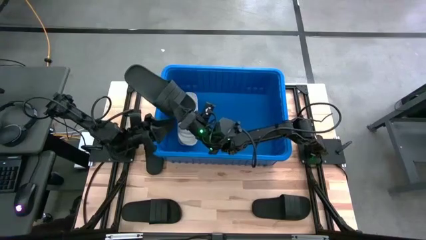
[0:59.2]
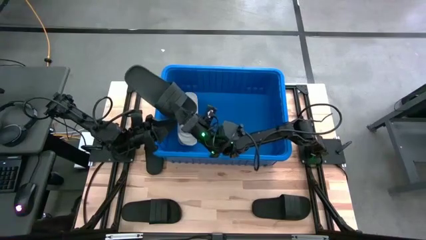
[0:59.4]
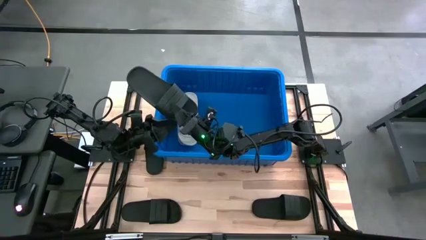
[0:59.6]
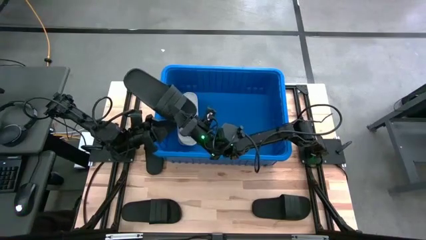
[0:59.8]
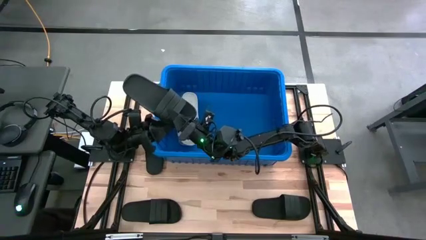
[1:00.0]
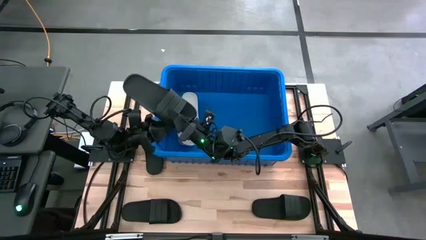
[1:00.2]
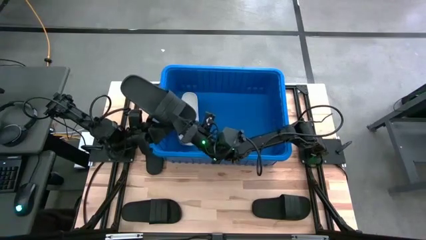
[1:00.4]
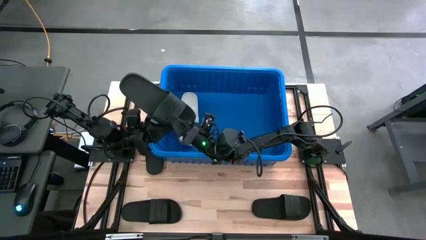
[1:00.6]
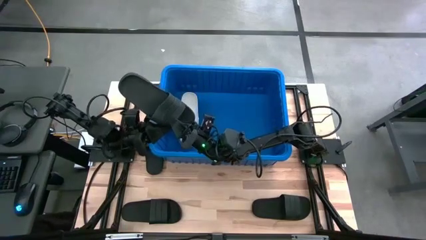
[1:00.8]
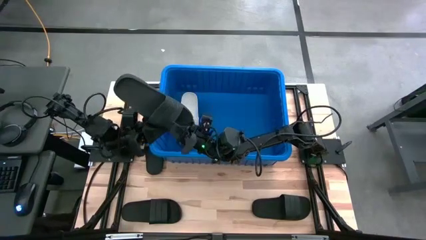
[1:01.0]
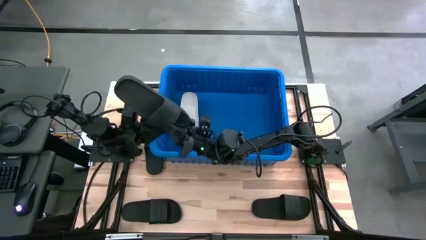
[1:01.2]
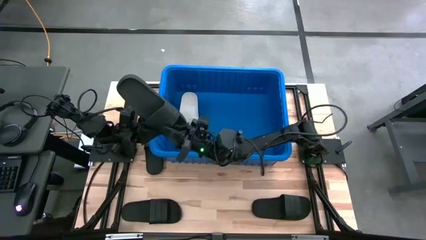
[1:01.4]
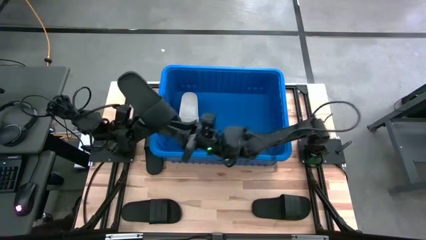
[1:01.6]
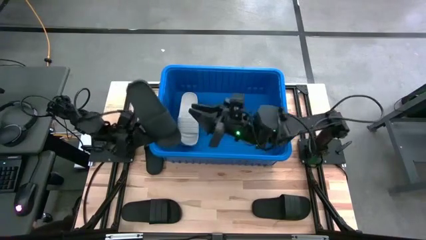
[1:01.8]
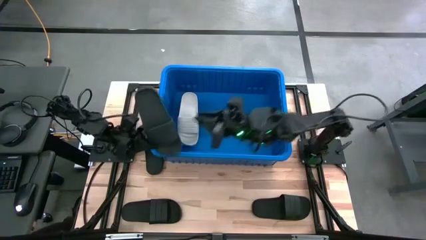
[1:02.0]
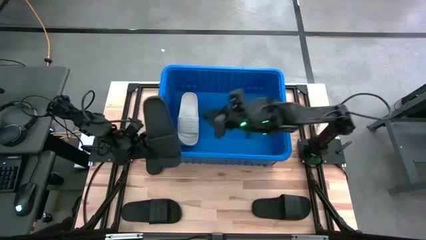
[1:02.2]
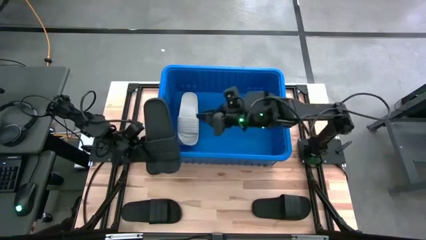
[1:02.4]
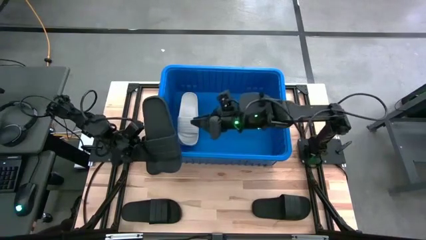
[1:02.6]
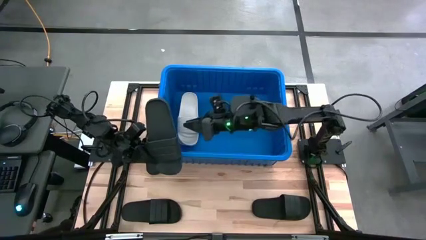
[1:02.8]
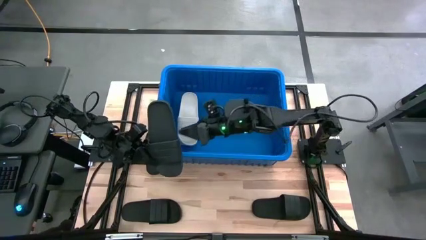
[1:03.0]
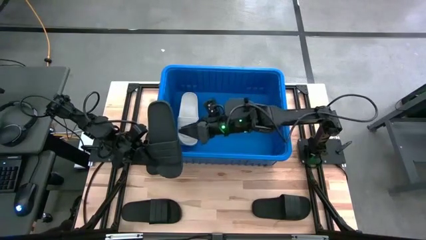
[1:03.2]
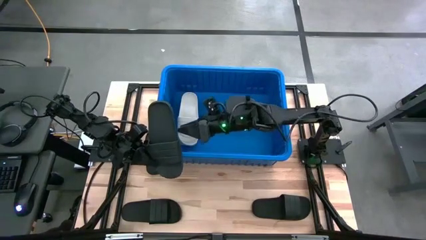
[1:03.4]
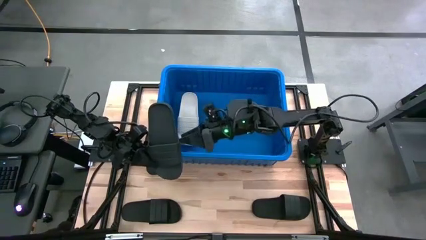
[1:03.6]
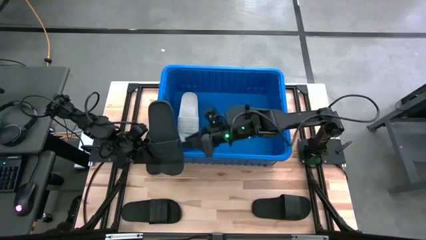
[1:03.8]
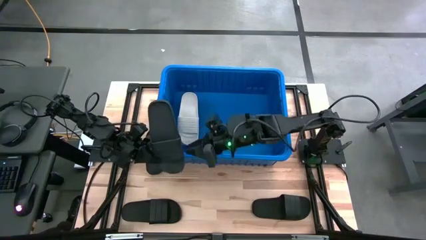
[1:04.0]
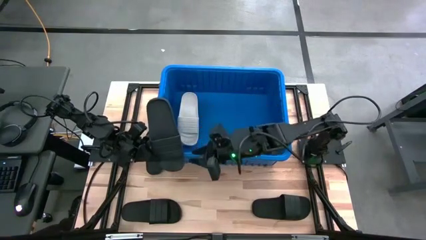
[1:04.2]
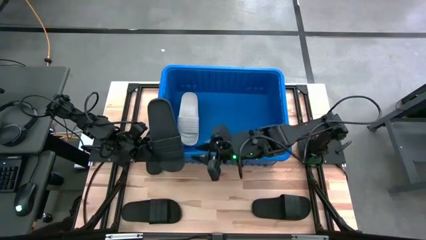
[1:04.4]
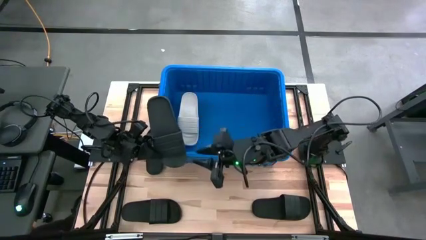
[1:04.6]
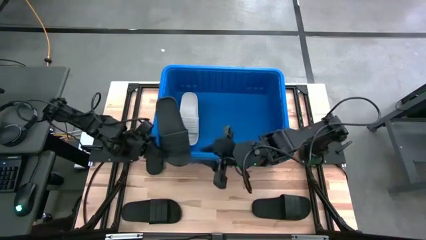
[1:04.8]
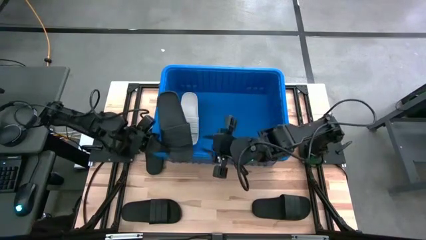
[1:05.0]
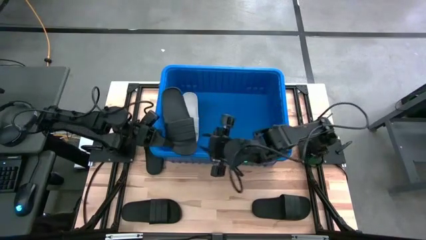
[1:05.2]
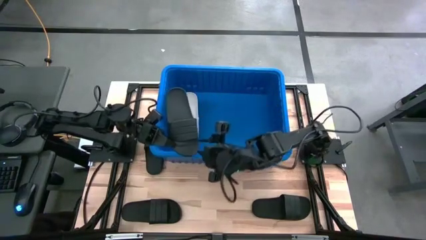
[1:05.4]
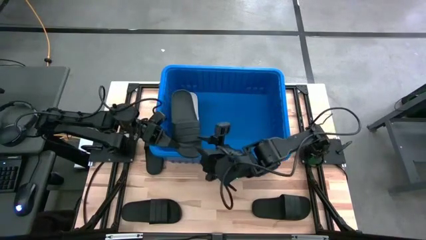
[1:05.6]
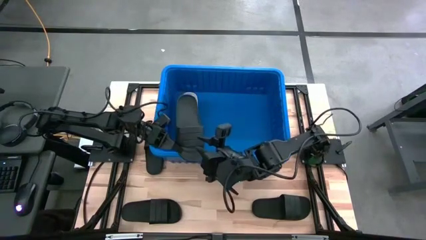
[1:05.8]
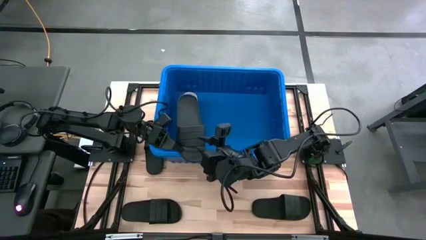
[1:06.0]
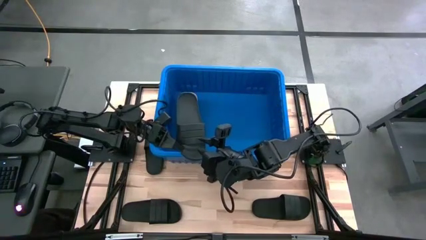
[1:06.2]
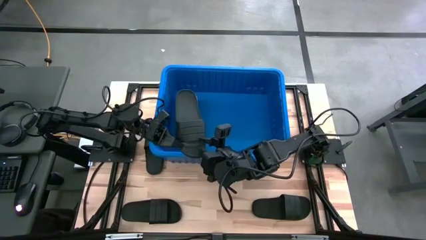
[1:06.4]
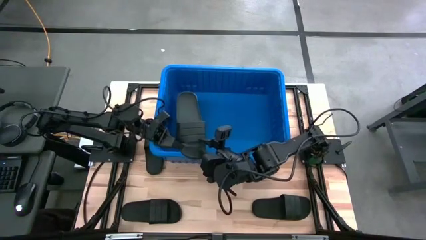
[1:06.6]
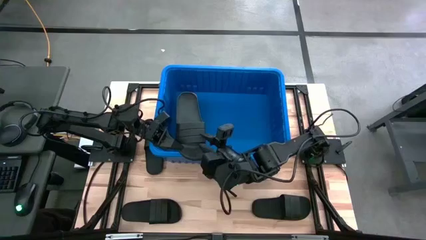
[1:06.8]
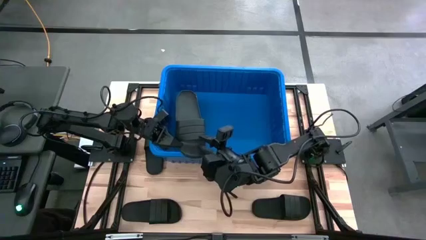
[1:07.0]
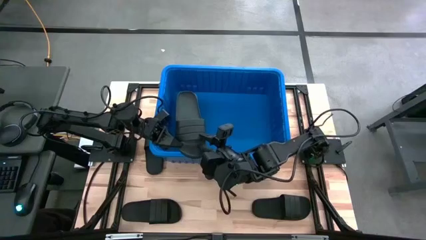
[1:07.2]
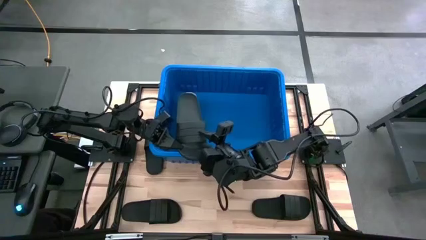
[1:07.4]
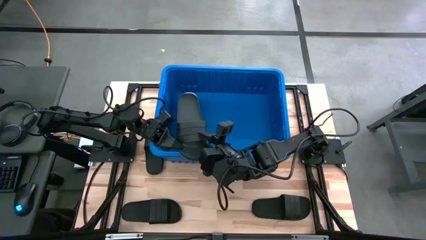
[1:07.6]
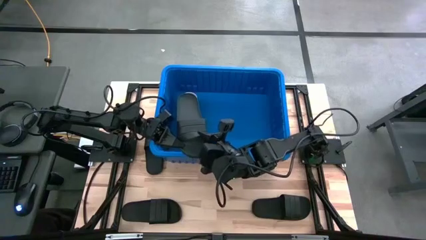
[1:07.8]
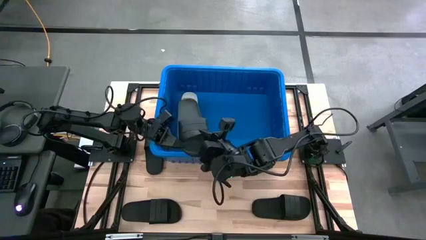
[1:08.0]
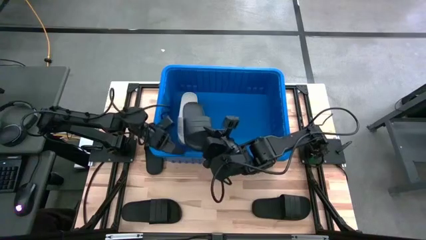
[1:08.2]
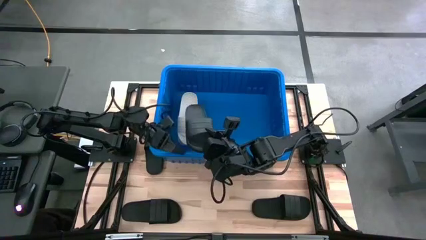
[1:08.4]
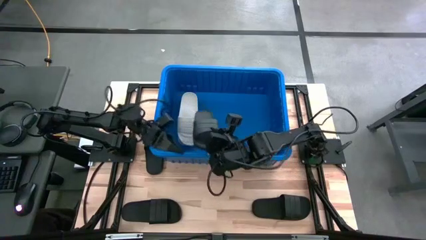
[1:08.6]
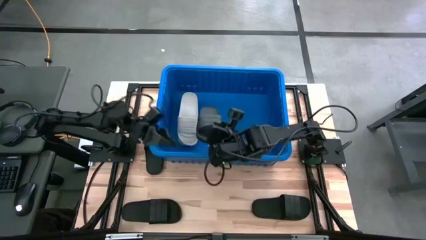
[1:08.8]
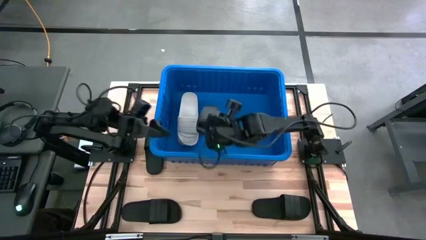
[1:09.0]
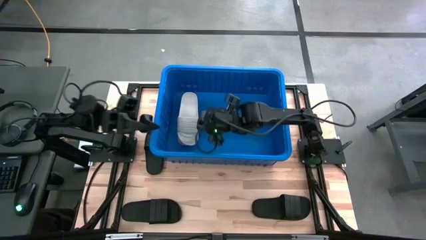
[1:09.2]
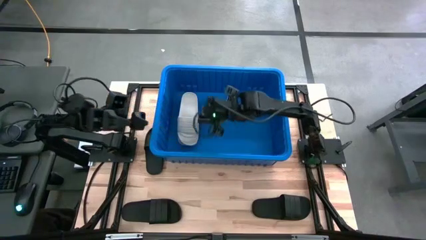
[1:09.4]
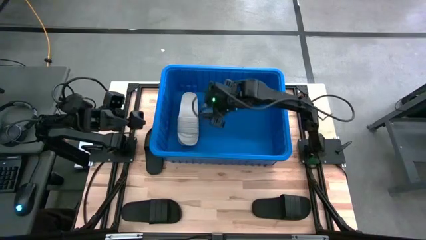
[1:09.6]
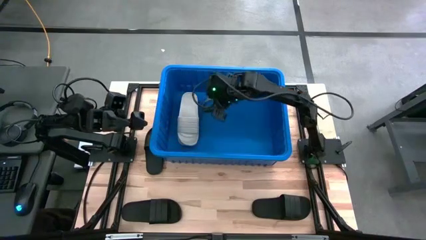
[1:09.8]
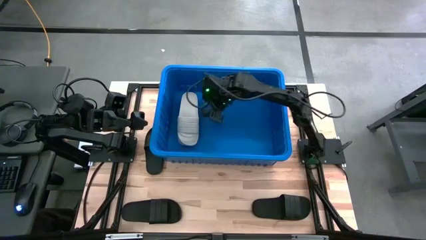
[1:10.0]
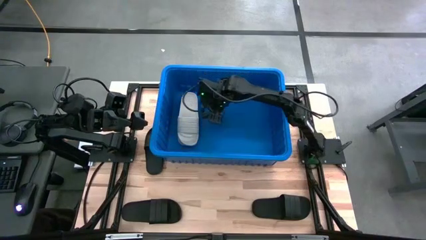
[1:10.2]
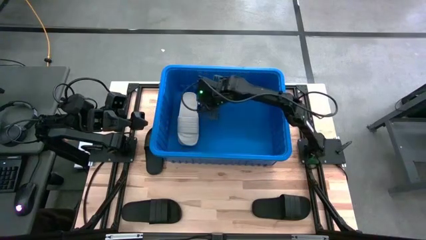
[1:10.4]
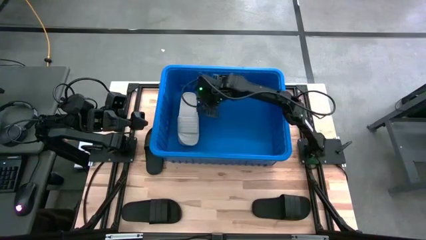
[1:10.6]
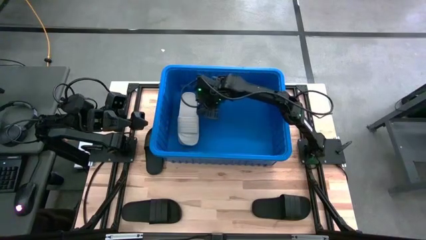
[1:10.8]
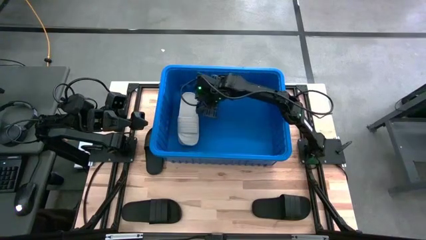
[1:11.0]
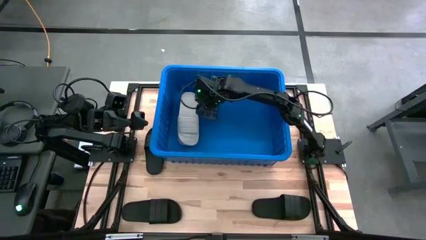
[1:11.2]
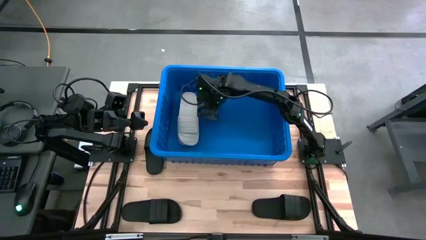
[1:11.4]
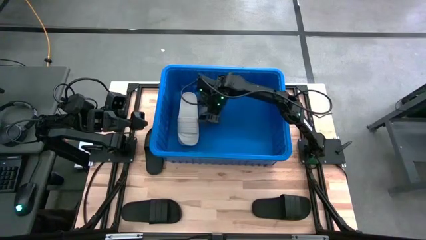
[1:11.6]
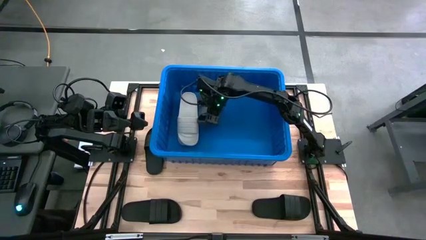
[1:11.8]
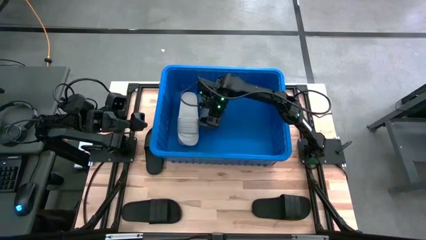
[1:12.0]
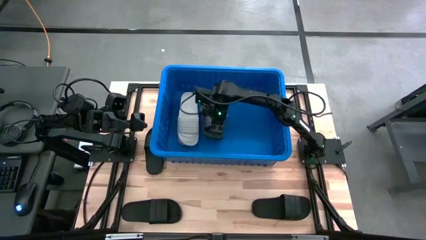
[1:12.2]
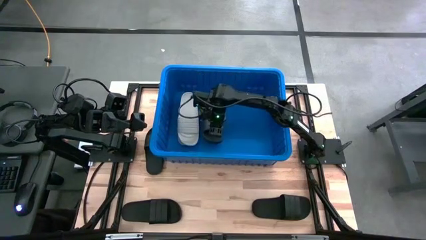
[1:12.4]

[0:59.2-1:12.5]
Task: Pick and place slides into bin
Put the black slide into the blue bin

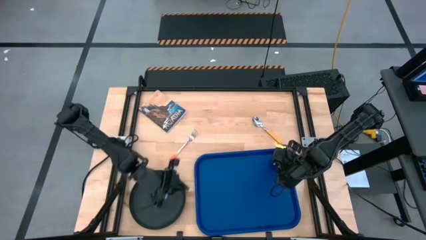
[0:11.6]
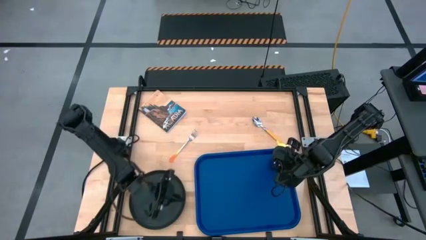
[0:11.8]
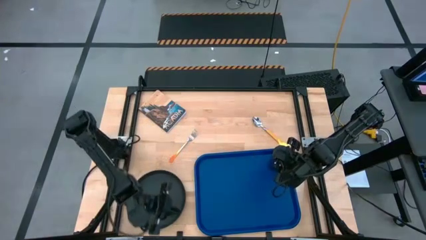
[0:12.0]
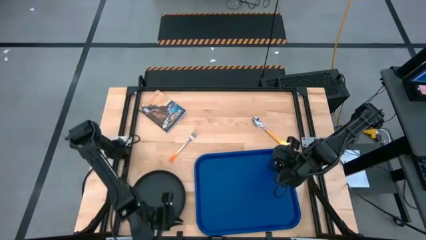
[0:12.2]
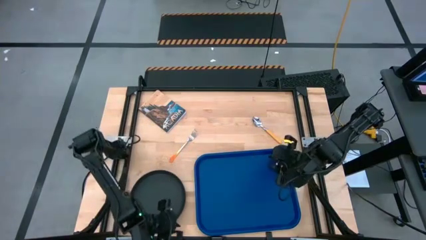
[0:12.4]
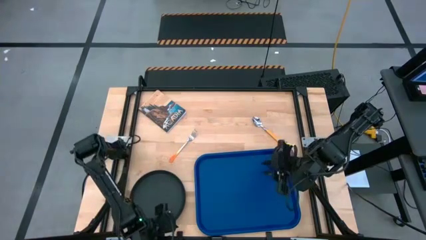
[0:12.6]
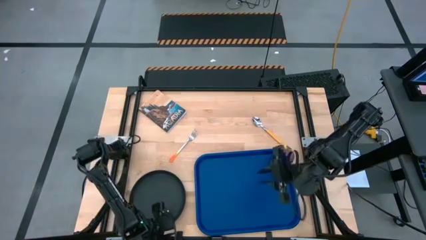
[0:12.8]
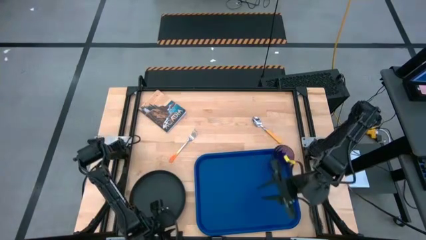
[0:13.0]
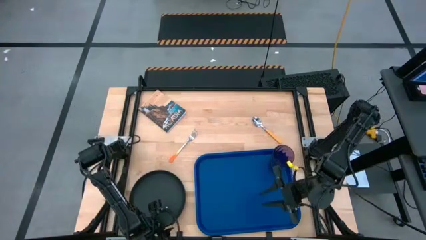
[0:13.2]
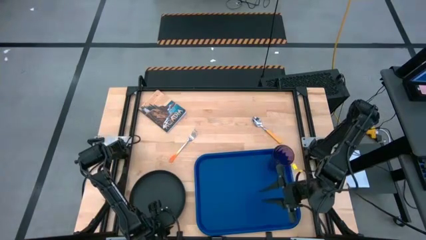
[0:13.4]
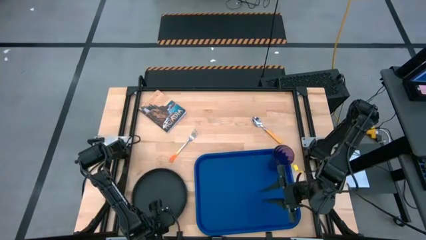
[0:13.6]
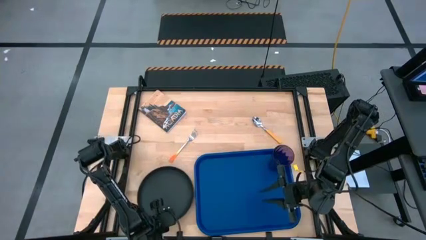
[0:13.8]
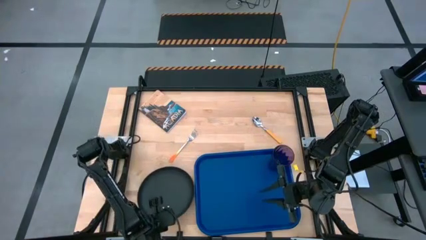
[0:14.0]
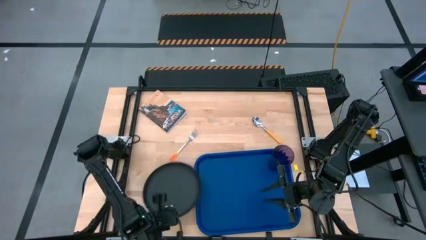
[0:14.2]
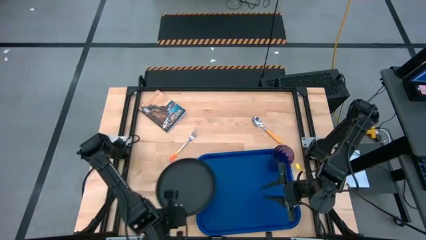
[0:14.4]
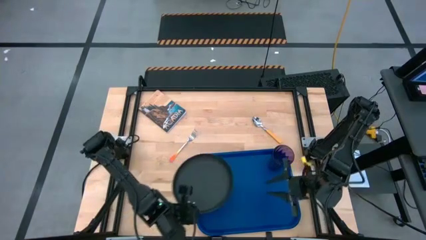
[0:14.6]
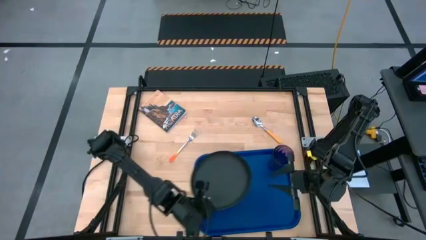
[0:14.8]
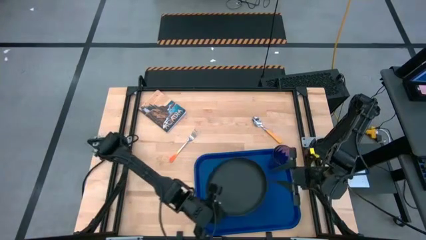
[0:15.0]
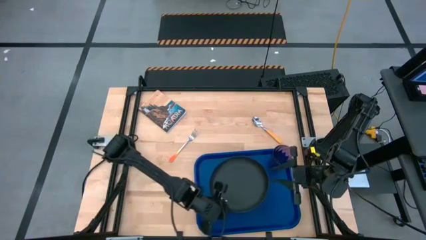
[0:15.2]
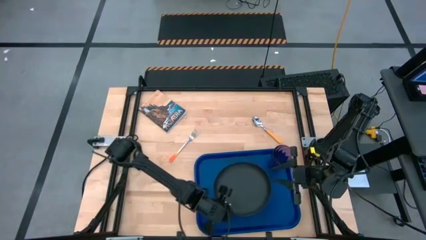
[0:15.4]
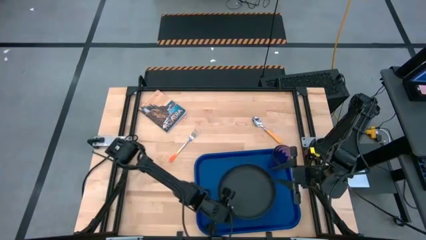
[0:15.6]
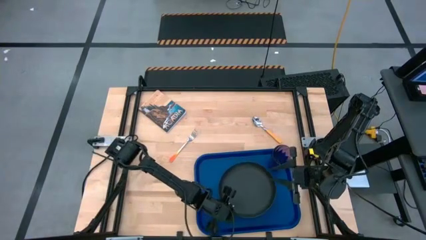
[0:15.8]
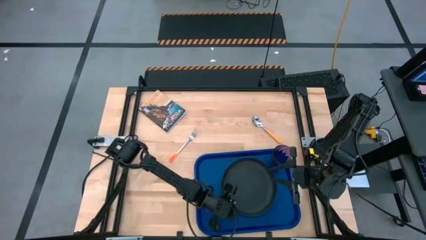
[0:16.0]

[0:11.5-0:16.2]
Task: Pick and place plate/cup/fork/spoon on tray
Put the black plate to the bottom of the violet cup on the blue serving tray
